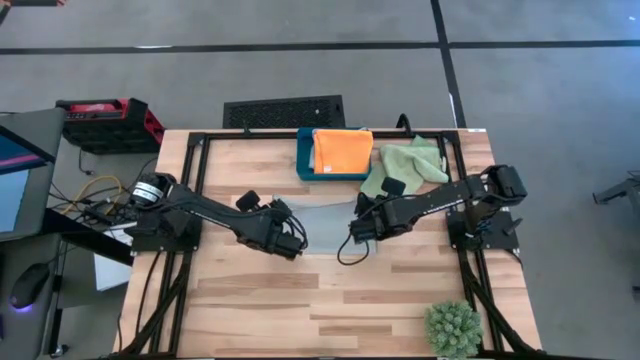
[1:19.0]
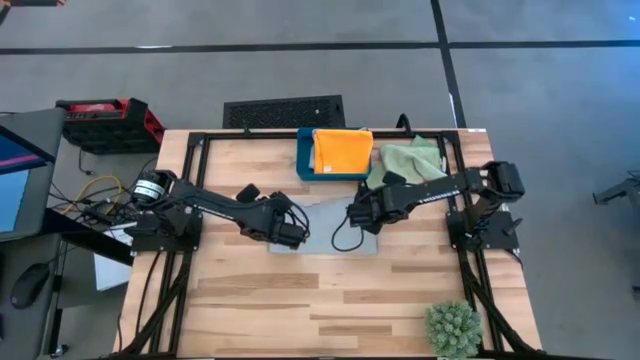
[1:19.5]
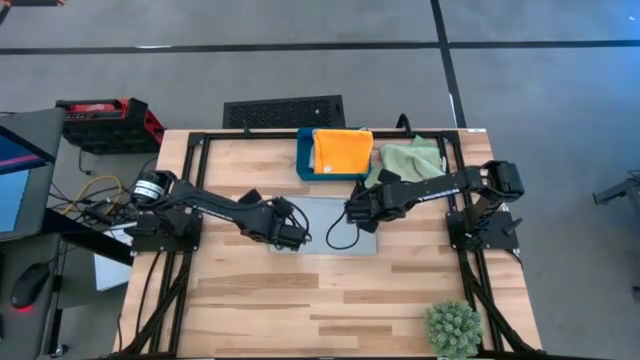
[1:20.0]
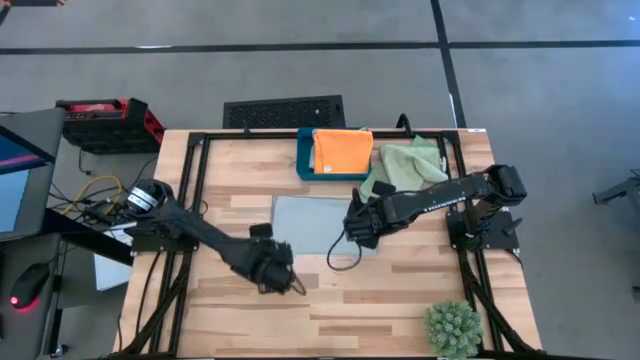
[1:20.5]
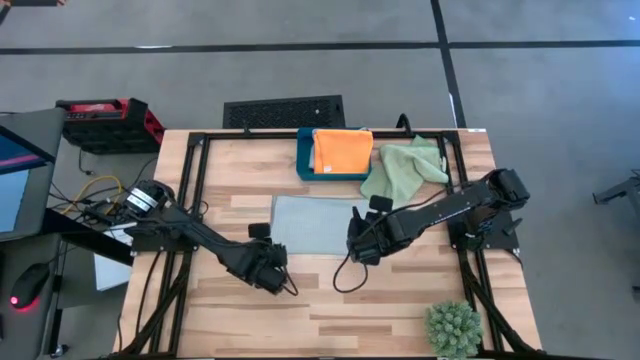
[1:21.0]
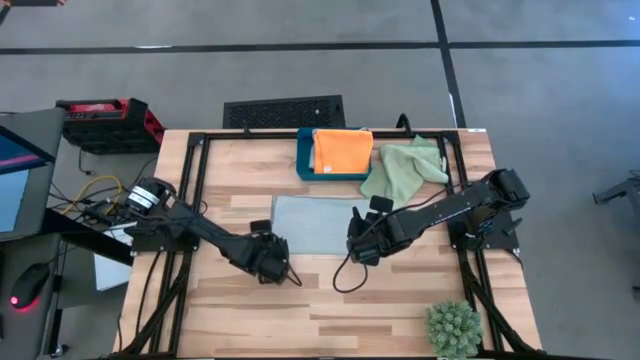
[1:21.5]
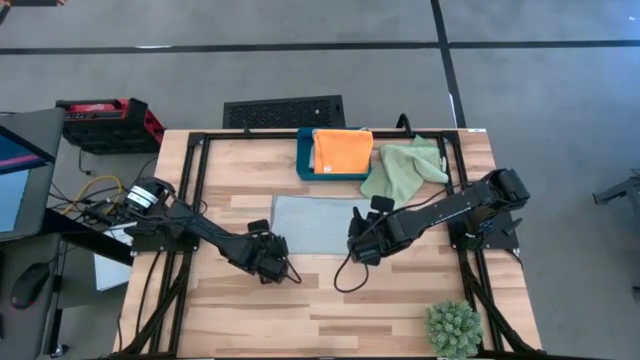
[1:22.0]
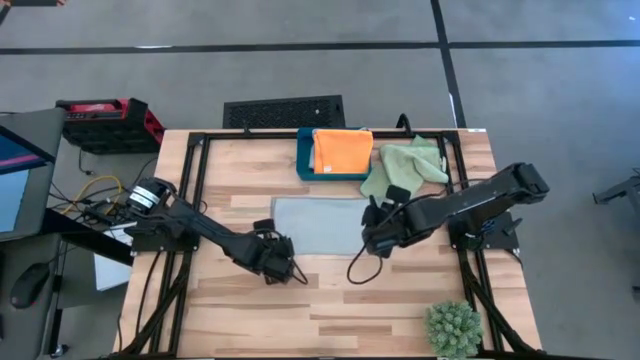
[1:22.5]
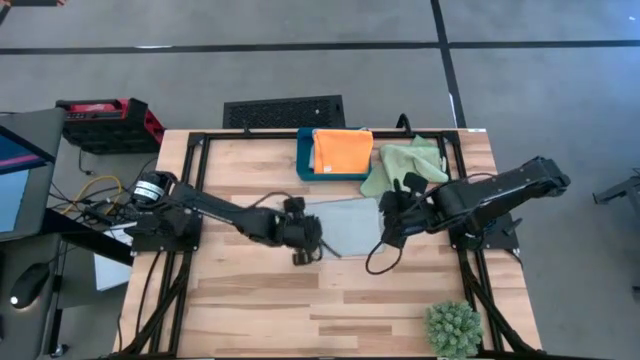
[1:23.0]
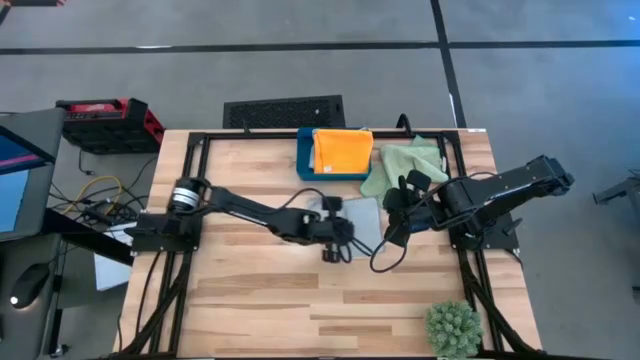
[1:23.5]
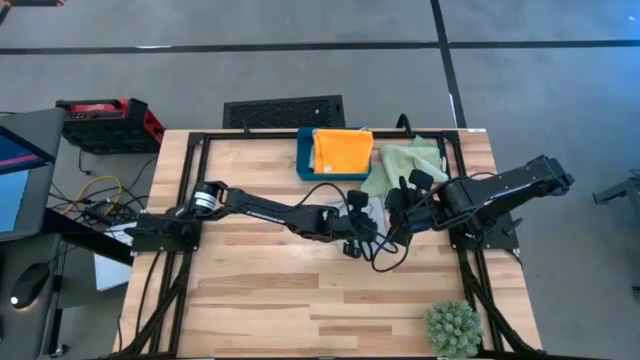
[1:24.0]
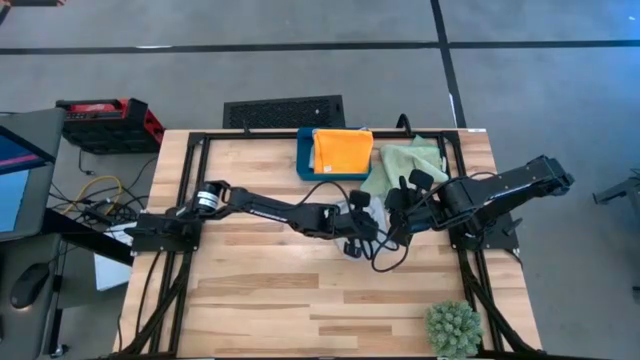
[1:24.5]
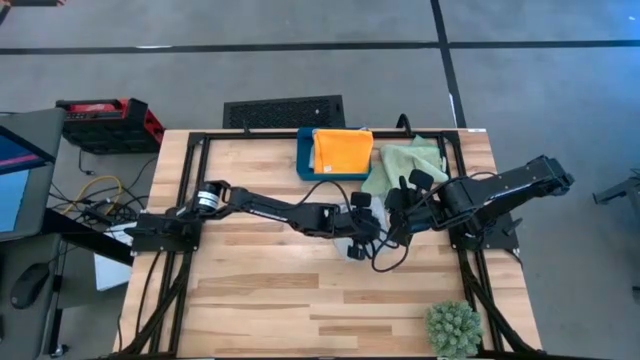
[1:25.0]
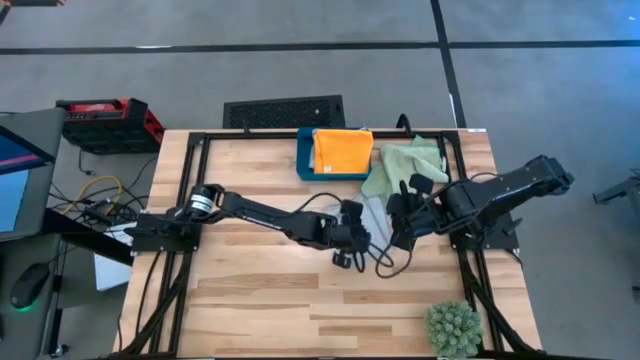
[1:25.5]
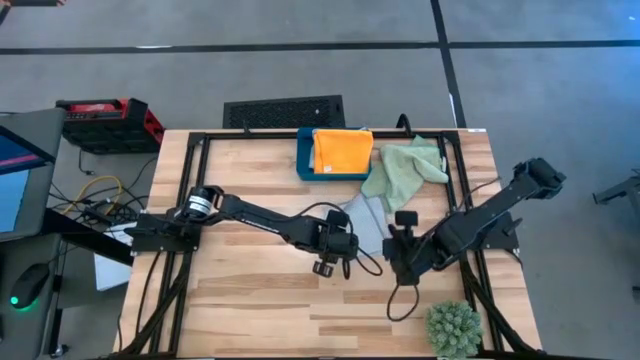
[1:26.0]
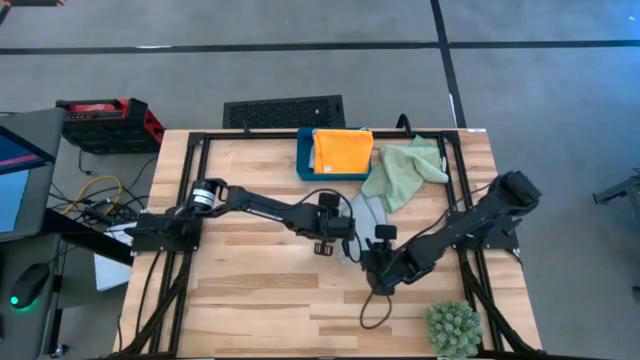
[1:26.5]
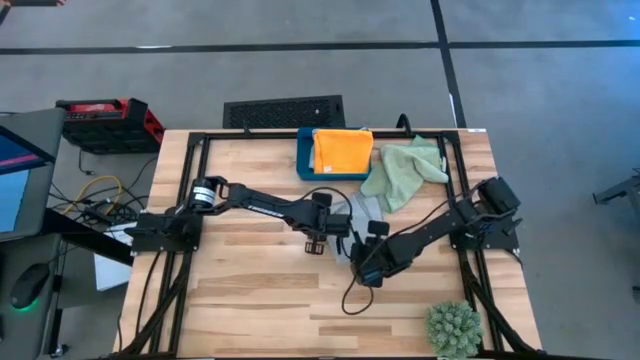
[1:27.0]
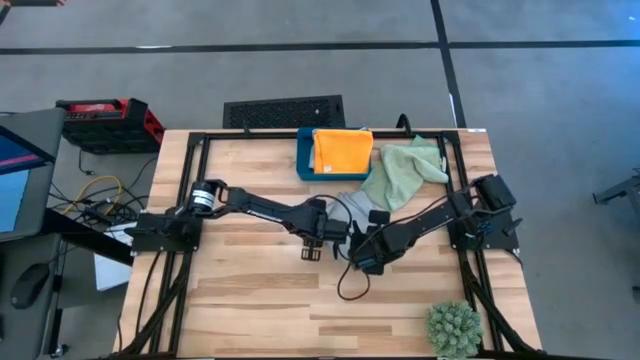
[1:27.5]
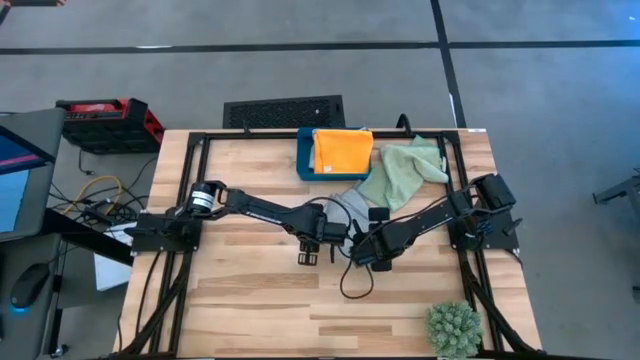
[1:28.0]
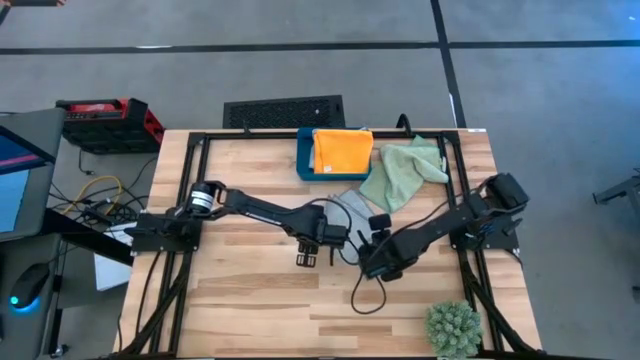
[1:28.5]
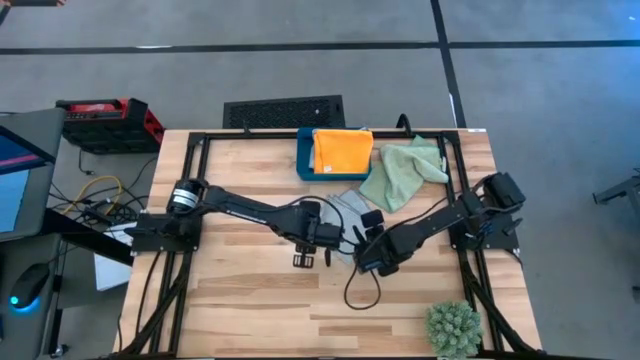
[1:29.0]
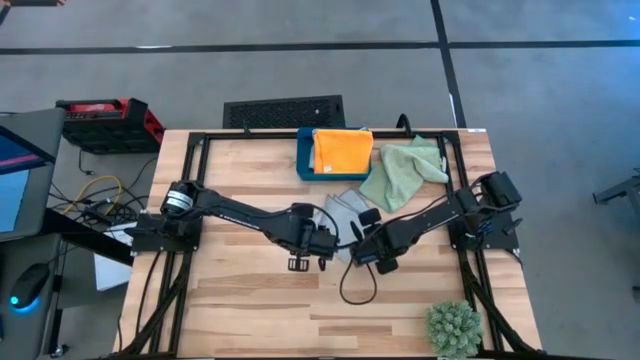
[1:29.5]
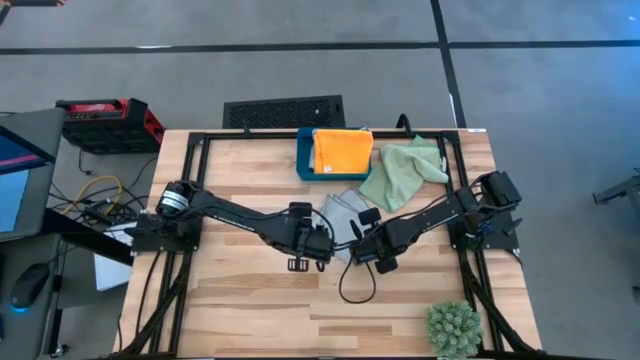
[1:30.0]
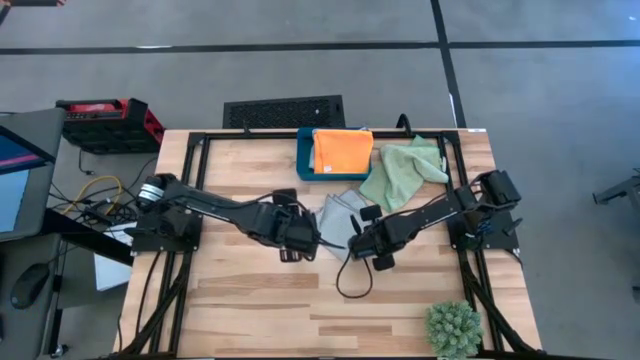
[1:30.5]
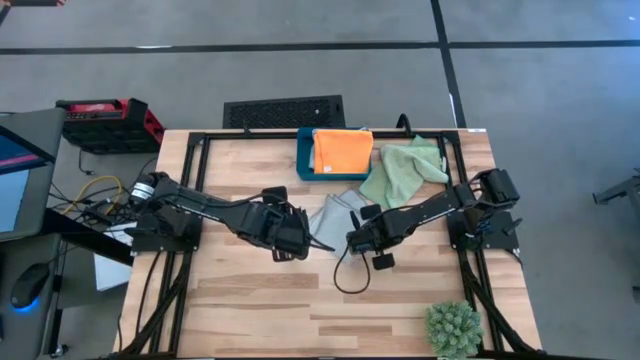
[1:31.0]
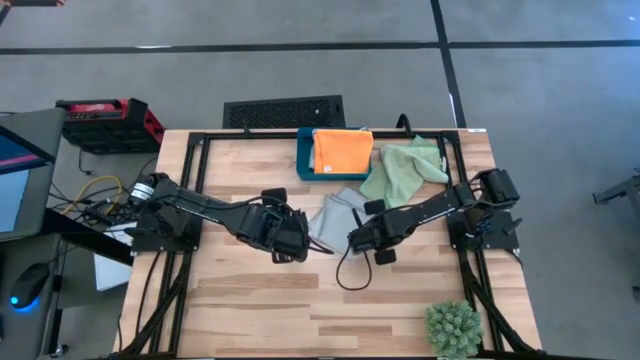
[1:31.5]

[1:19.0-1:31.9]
Task: Fold microfiber towels
Fold the gray microfiber cloth

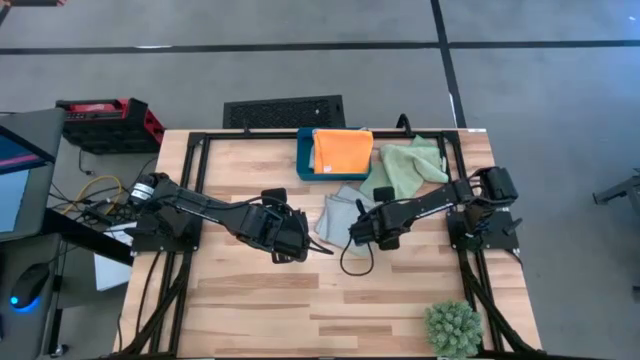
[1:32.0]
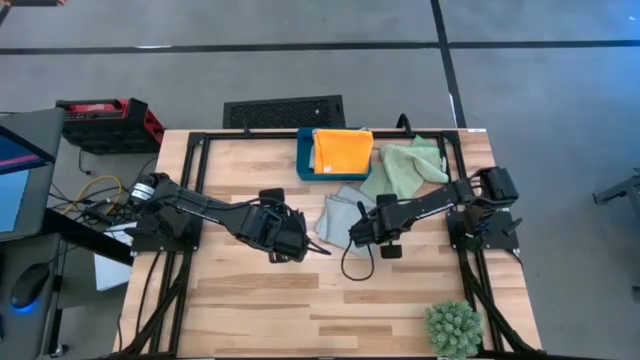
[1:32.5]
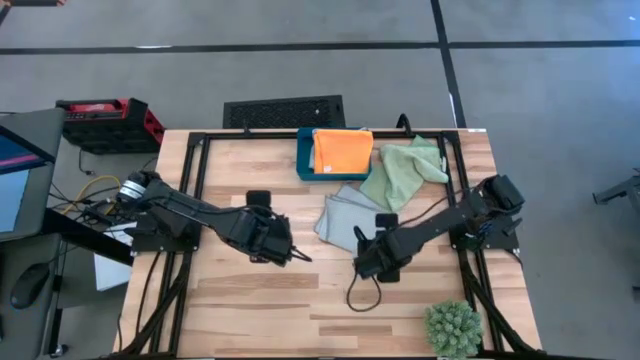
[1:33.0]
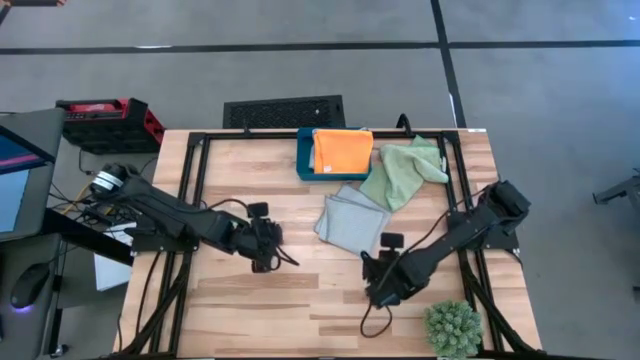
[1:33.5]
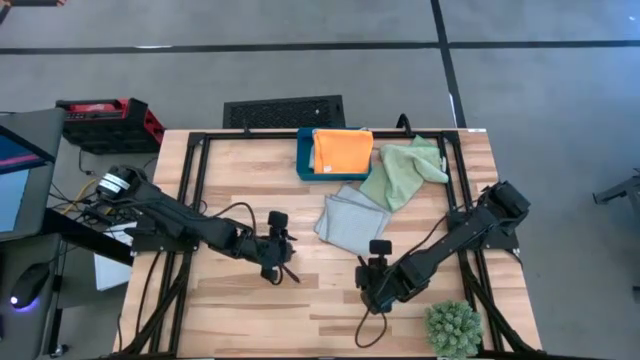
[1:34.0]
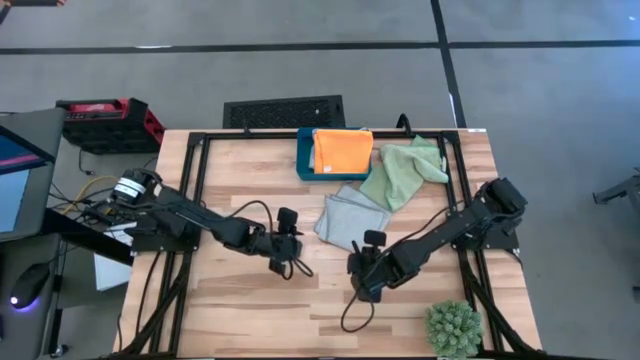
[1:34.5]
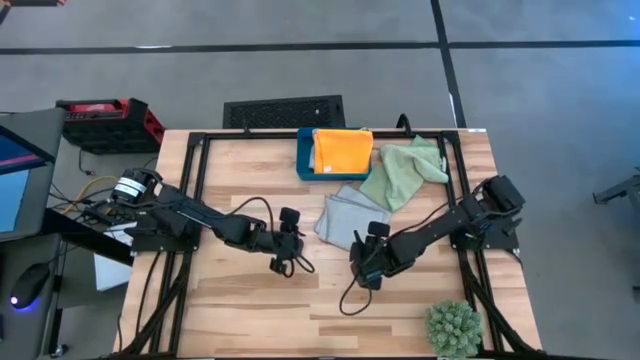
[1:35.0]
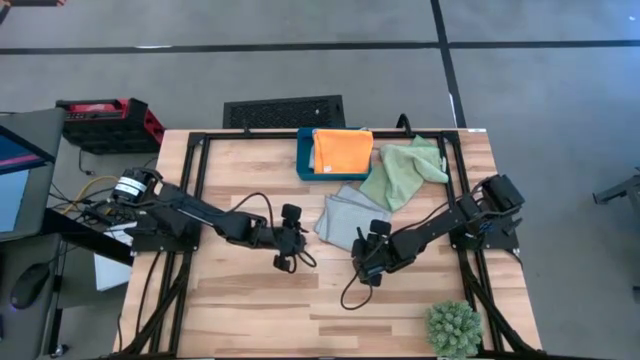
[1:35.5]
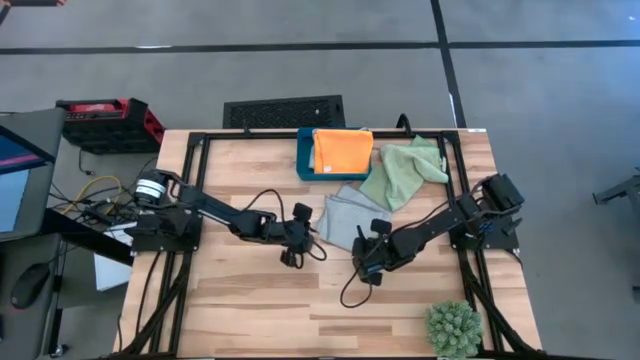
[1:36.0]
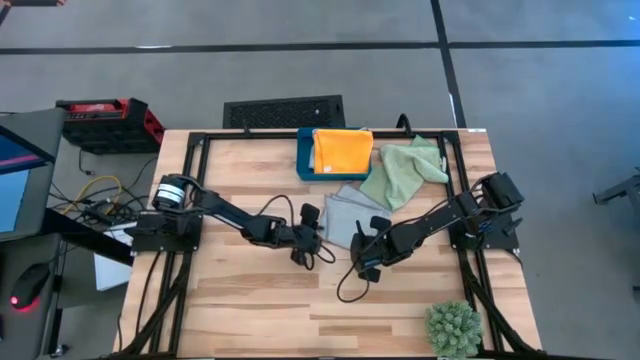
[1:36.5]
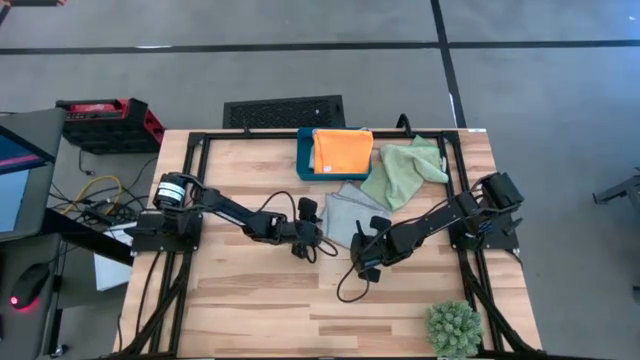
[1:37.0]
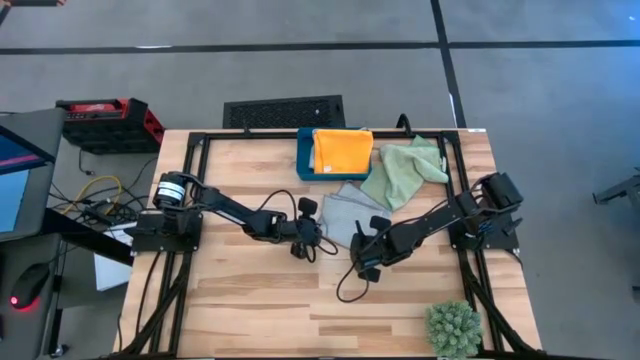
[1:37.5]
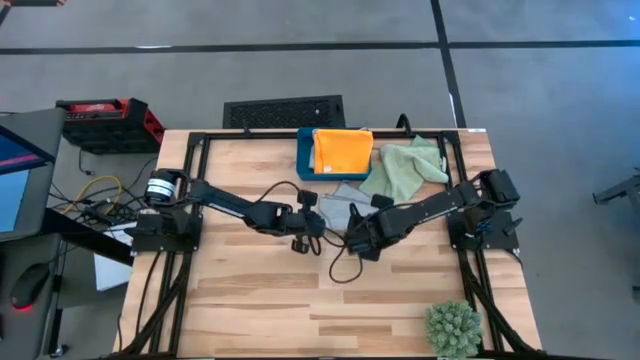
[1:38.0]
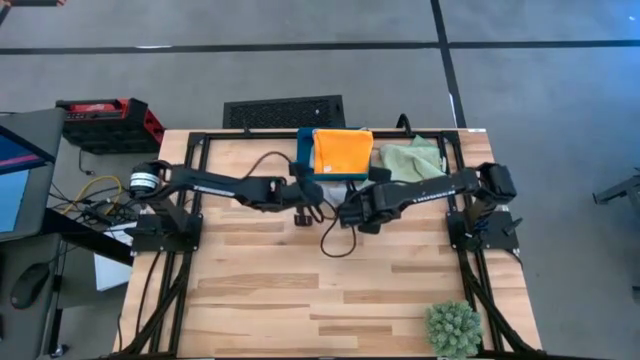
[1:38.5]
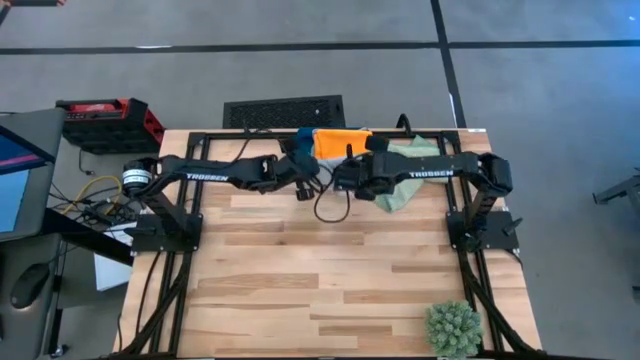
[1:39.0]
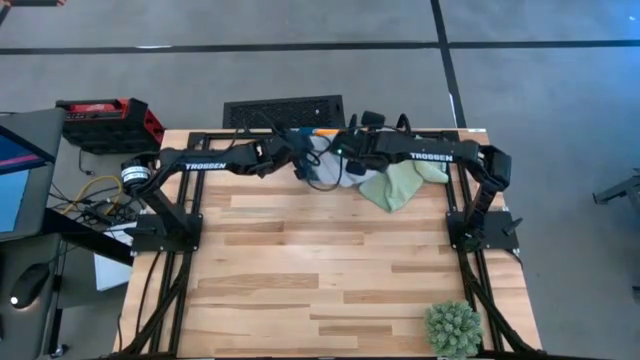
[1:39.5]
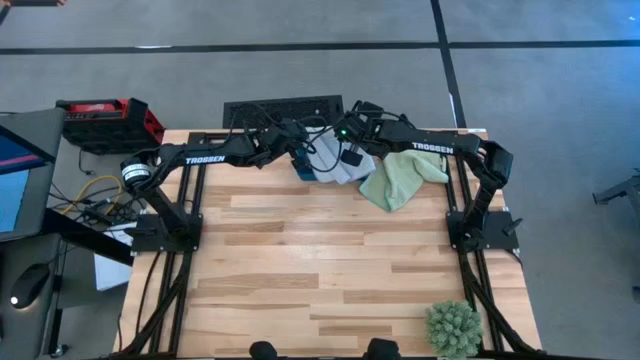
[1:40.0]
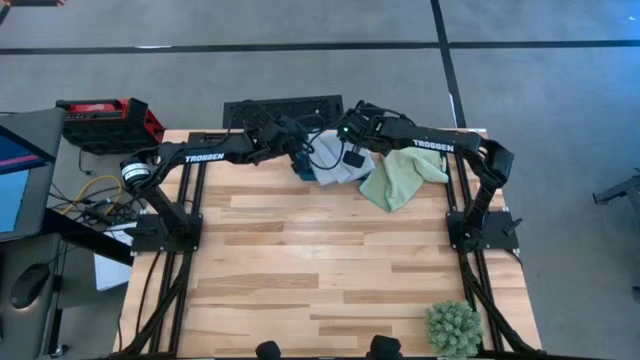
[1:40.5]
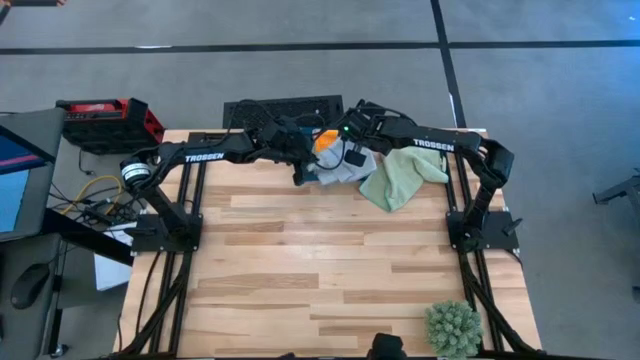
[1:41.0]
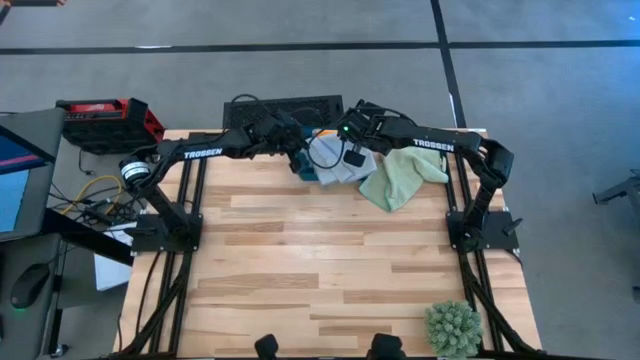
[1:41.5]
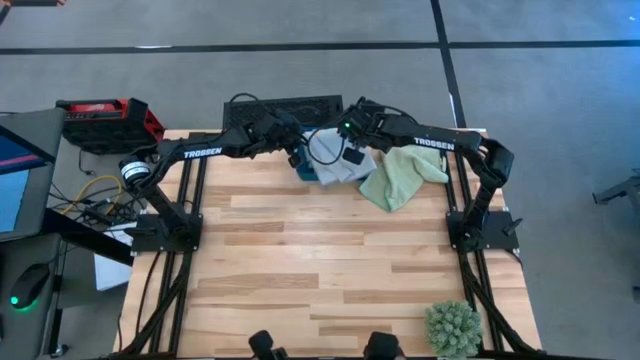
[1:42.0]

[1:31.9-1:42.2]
Put the folded gray microfiber cloth into the blue bin
